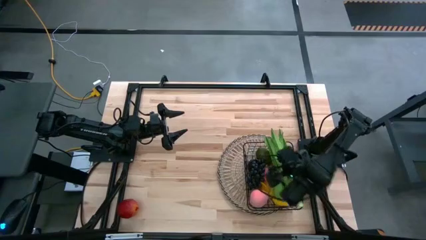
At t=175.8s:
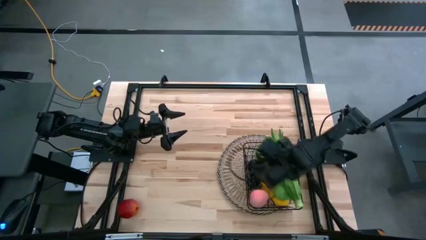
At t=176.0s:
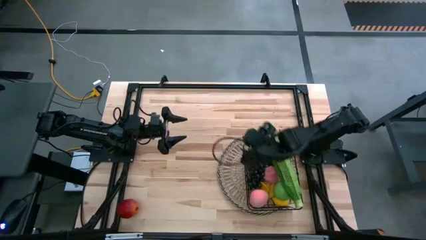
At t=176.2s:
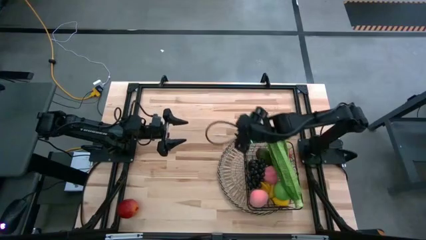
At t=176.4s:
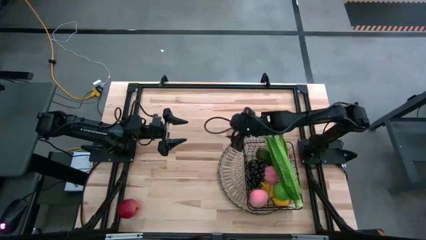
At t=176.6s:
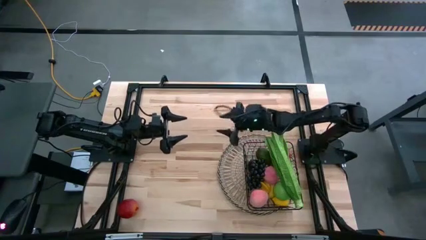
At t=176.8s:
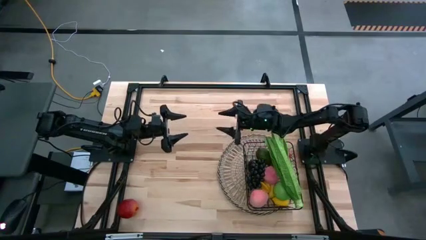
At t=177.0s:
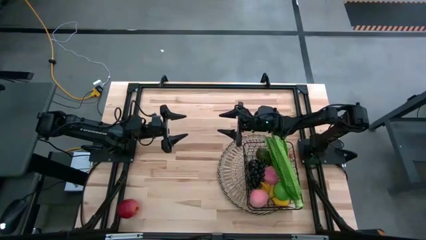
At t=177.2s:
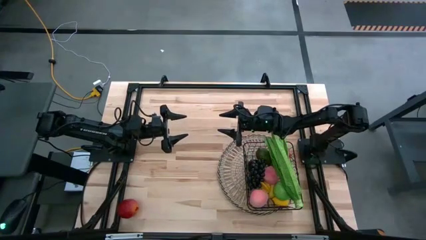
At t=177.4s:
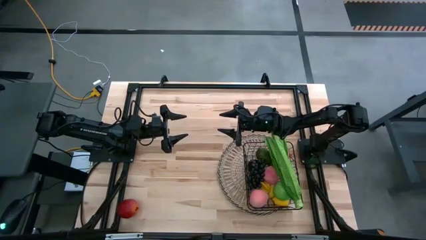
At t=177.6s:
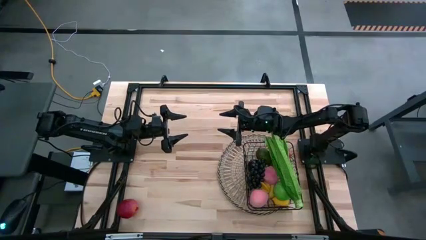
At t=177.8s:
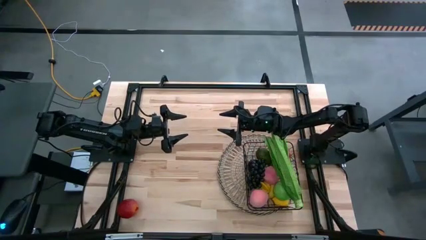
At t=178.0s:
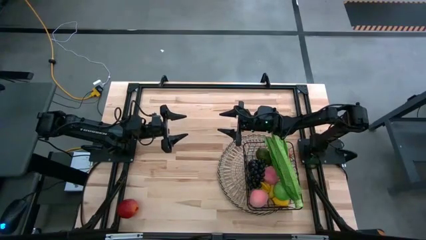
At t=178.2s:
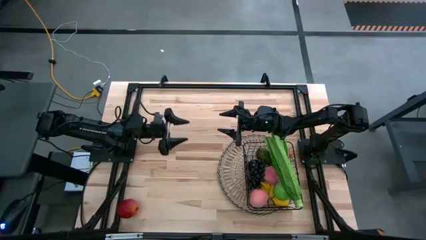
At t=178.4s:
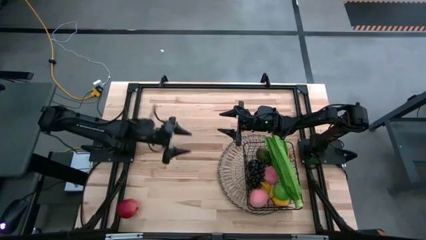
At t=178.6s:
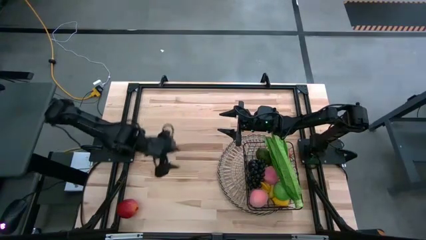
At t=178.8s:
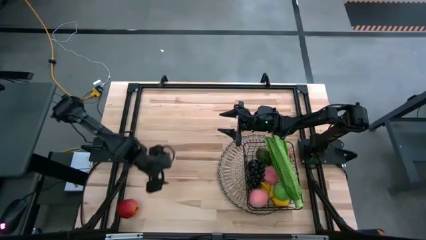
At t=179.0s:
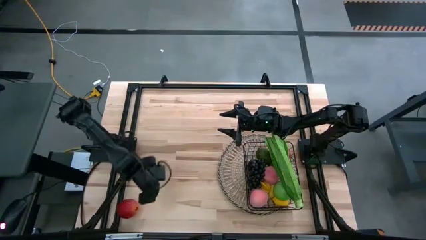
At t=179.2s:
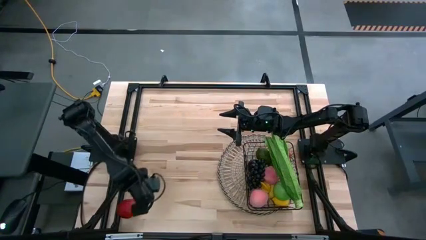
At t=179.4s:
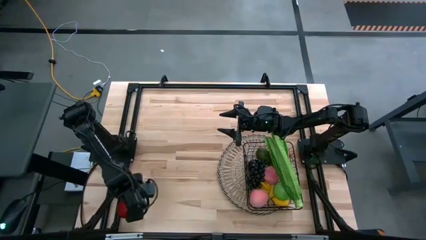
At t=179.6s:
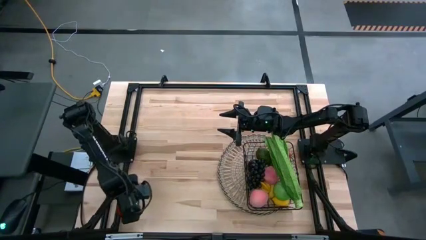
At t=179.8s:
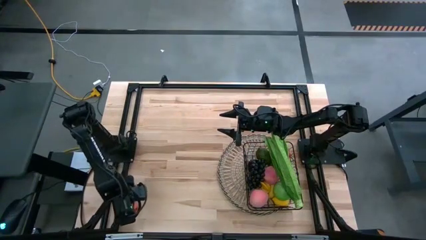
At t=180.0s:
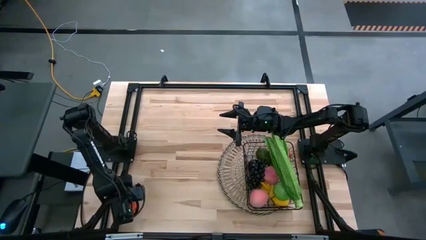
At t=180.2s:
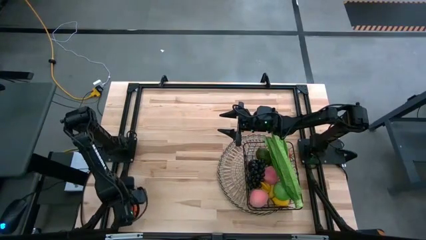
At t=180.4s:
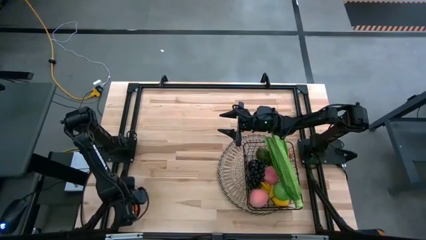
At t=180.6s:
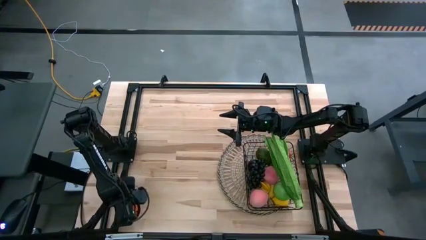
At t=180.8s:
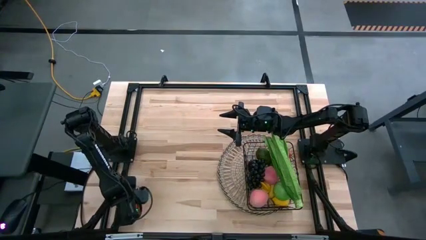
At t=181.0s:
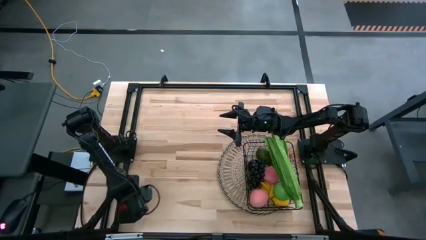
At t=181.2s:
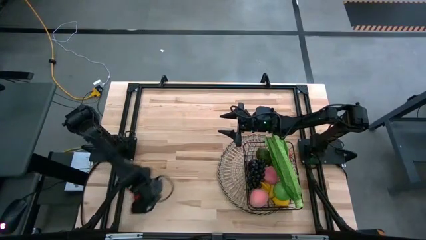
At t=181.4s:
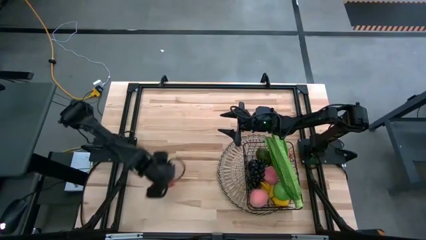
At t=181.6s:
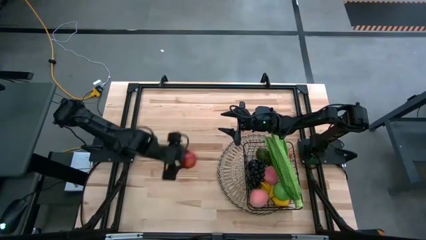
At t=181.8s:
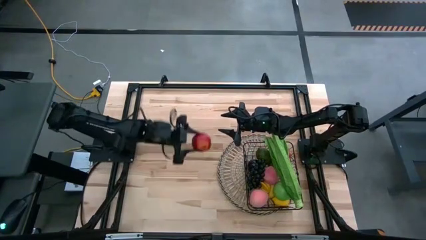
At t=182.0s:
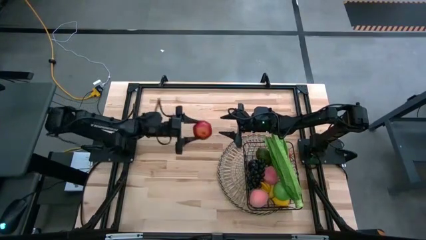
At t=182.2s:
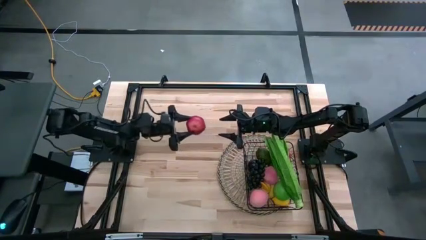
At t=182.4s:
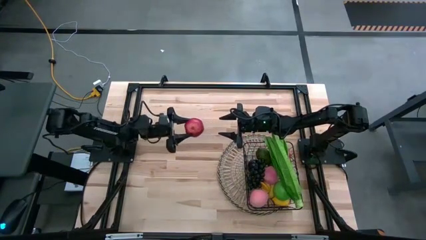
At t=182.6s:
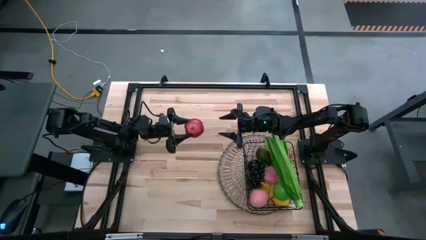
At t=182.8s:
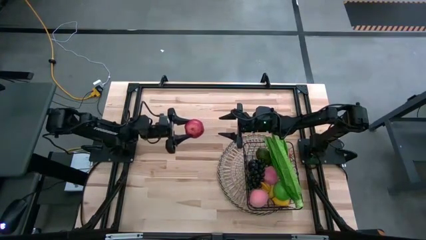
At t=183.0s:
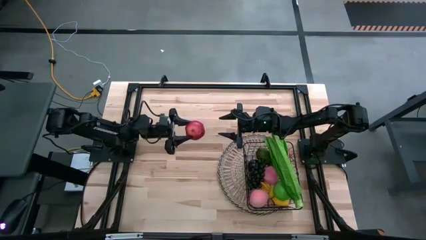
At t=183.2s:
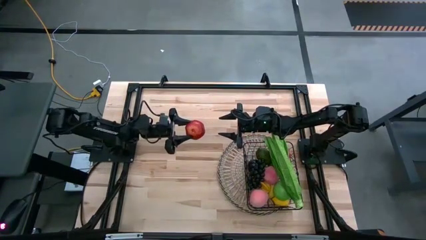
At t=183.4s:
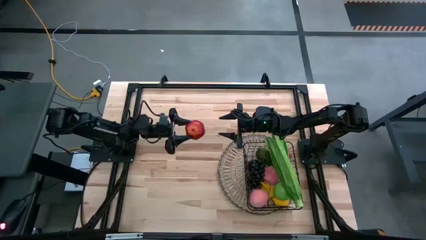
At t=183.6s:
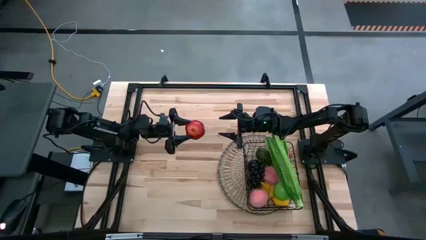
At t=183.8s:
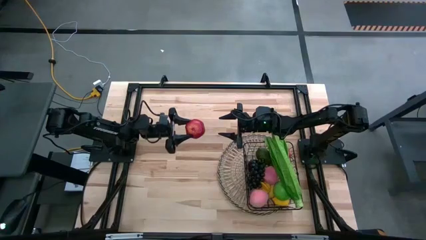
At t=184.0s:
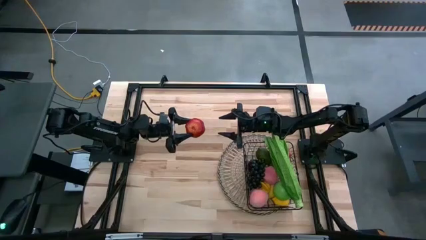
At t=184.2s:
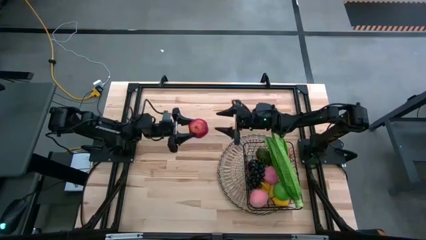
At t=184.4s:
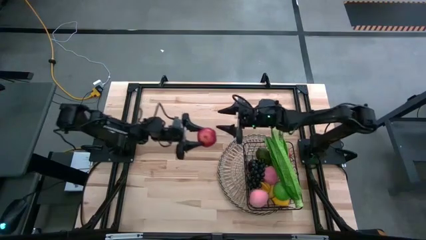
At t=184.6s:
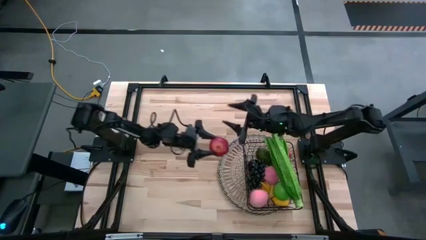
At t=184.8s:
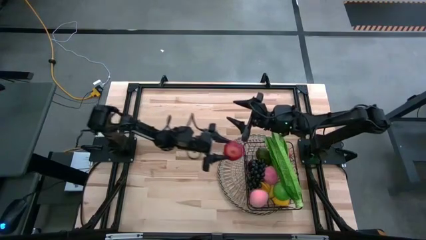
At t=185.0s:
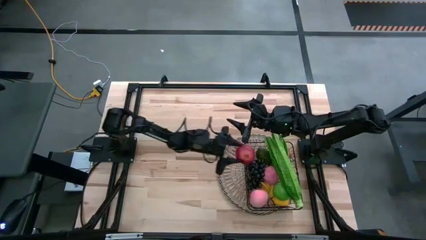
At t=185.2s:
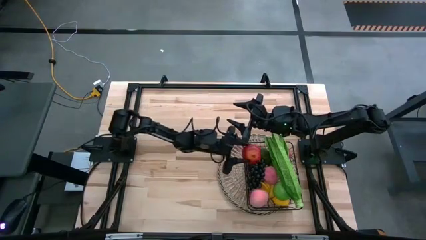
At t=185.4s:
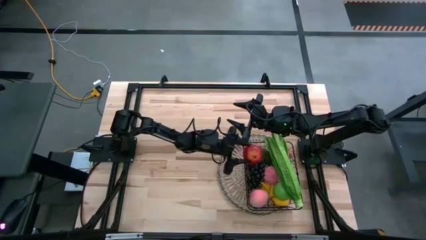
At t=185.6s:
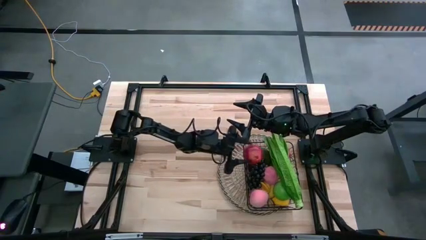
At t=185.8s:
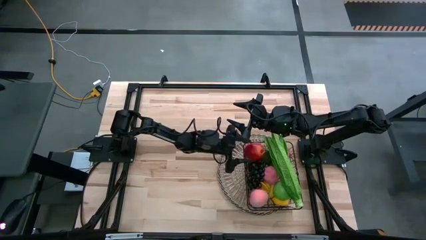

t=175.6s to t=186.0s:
Task: Build produce basket
Put the pomegranate into the wire basket

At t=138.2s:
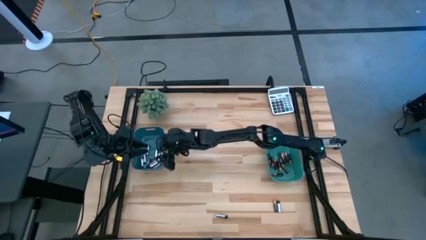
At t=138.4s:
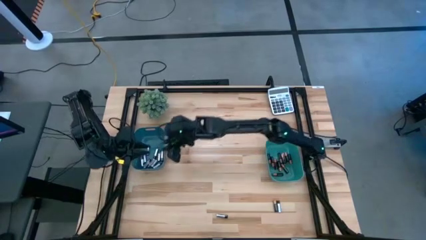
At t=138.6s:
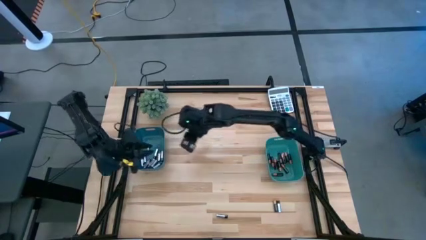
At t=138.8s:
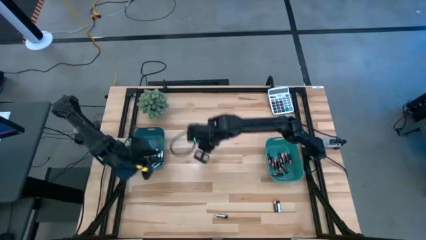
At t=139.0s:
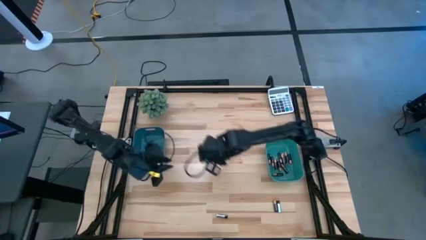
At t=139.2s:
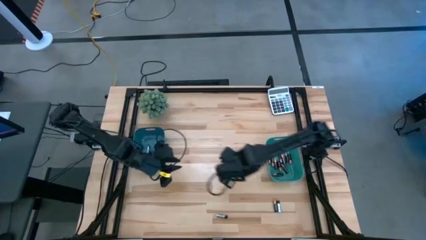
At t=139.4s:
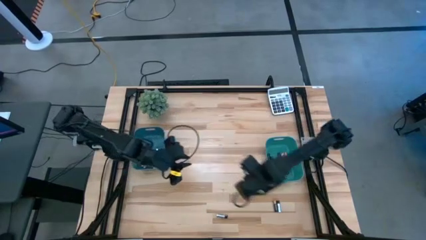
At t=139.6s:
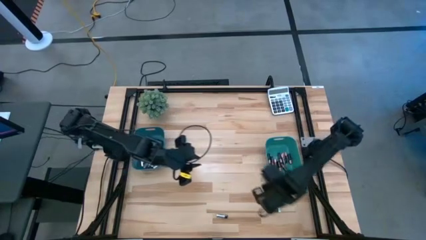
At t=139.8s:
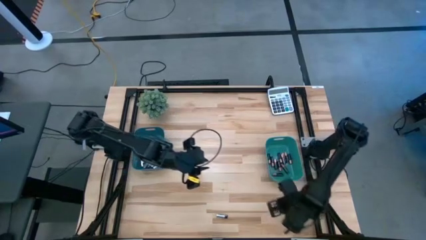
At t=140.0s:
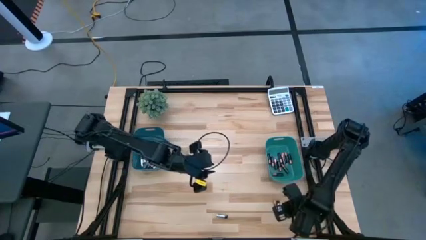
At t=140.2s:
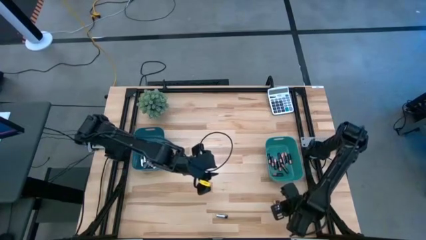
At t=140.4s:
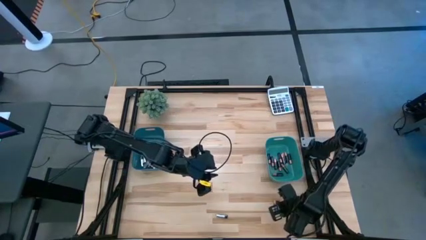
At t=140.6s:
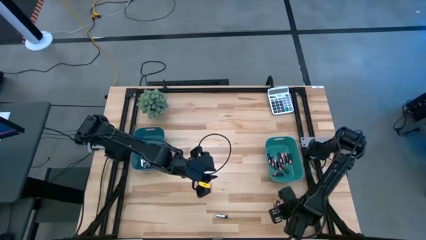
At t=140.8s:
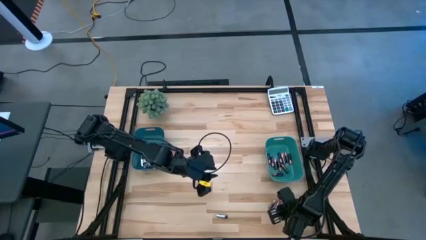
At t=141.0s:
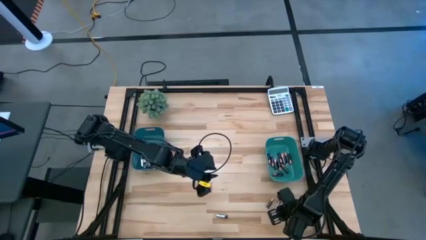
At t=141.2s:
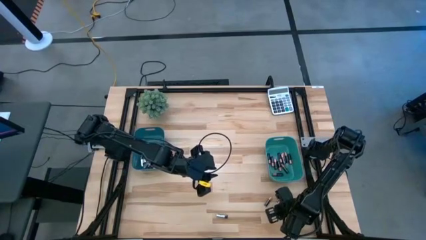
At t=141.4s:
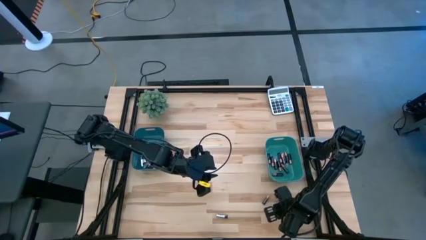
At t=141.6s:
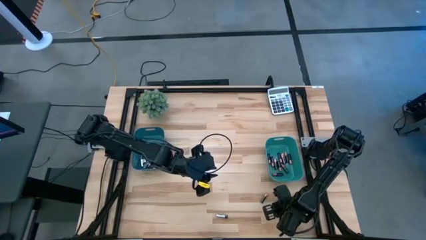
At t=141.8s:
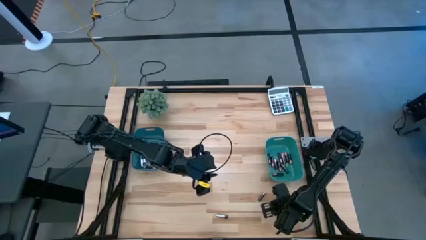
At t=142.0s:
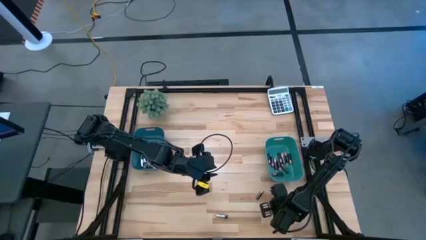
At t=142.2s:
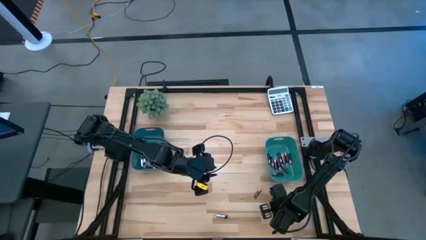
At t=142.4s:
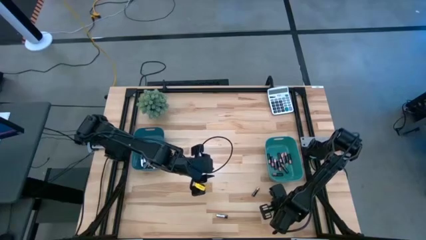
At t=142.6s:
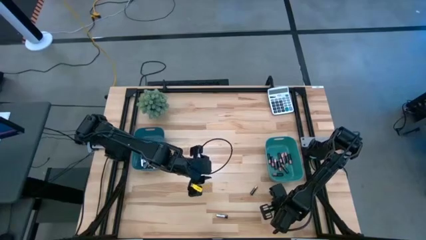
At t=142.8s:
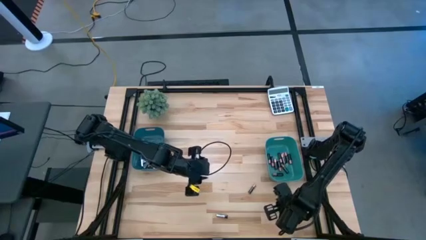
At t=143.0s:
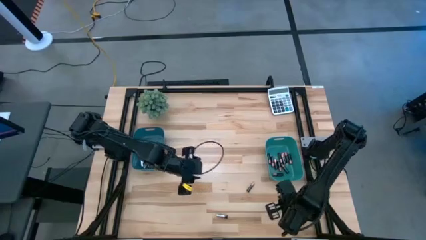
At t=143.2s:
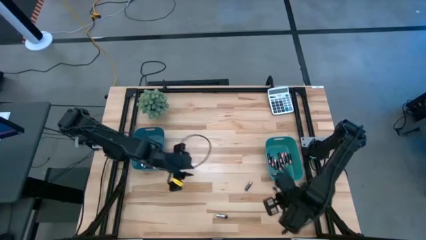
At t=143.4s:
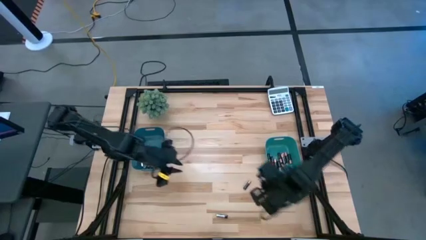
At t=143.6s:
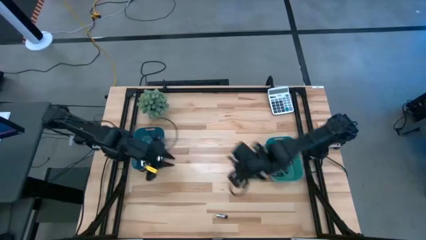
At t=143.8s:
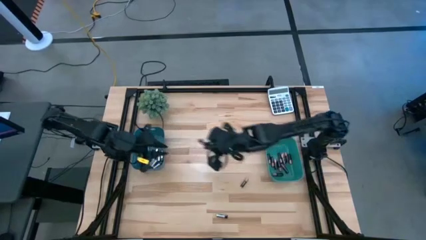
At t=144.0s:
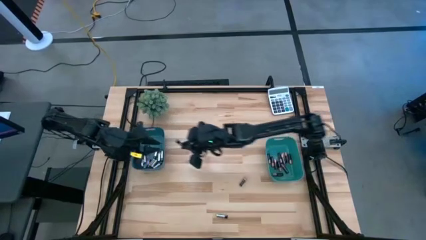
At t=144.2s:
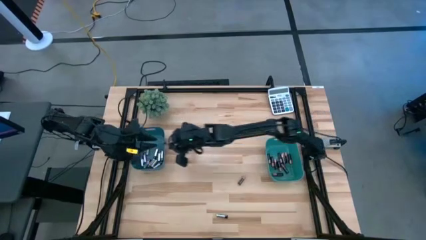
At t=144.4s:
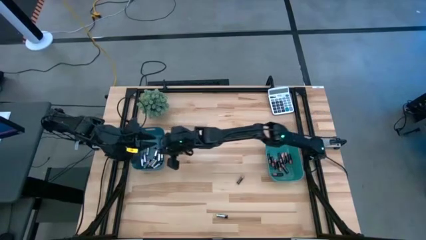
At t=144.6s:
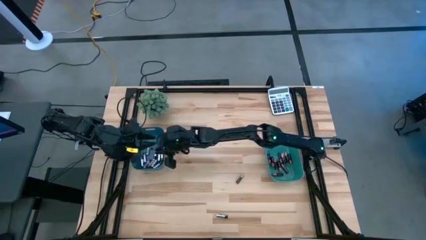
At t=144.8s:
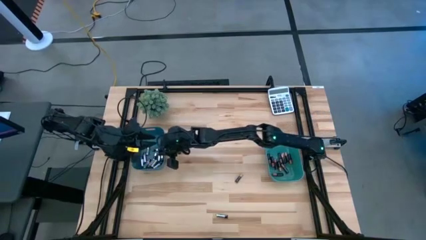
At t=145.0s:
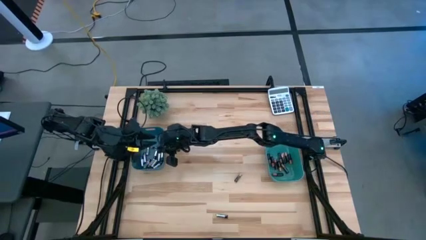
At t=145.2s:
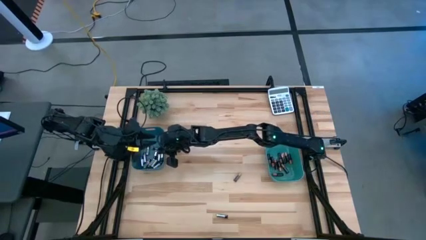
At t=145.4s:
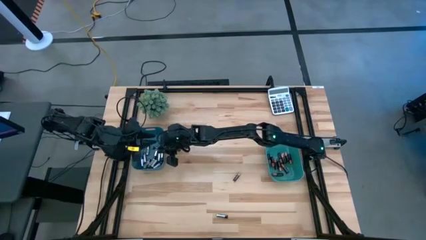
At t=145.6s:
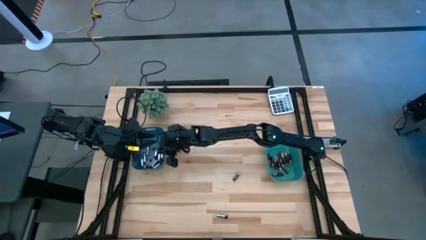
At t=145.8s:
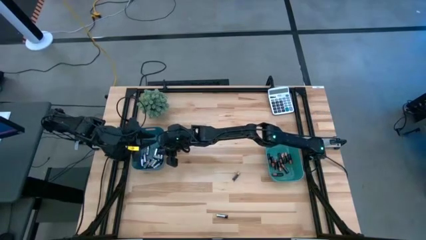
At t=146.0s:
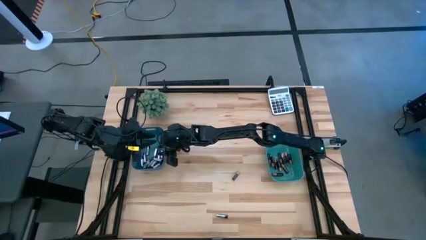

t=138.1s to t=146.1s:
Task: Sort batteries
Put the silver battery into the blue bin
